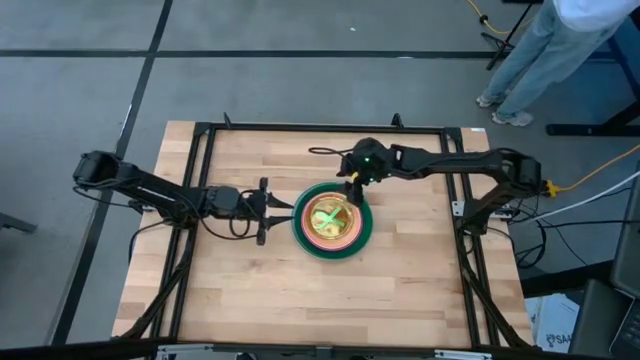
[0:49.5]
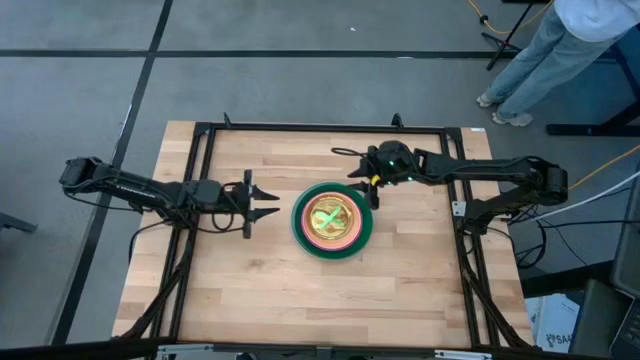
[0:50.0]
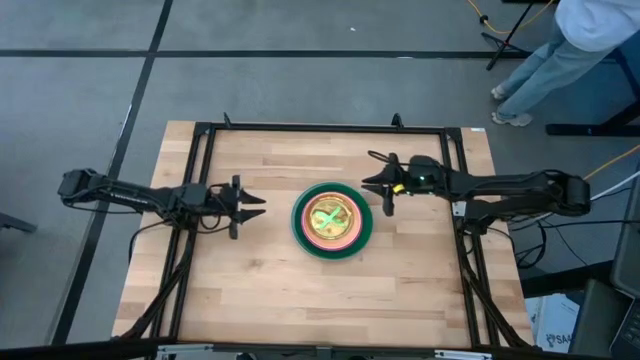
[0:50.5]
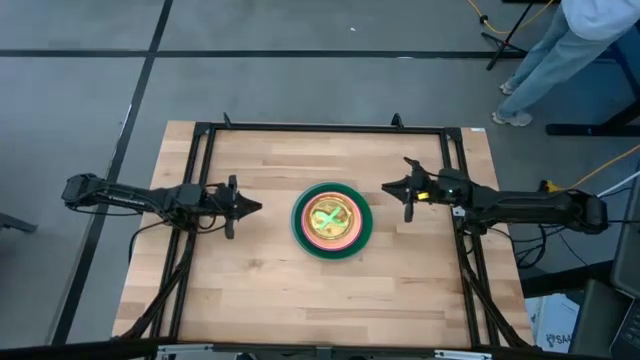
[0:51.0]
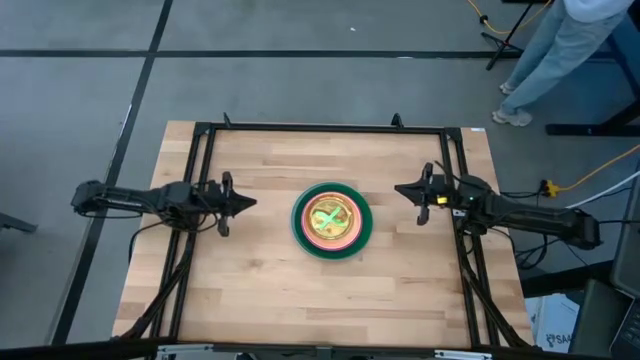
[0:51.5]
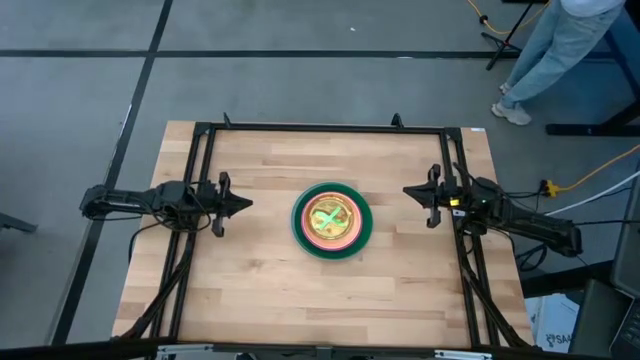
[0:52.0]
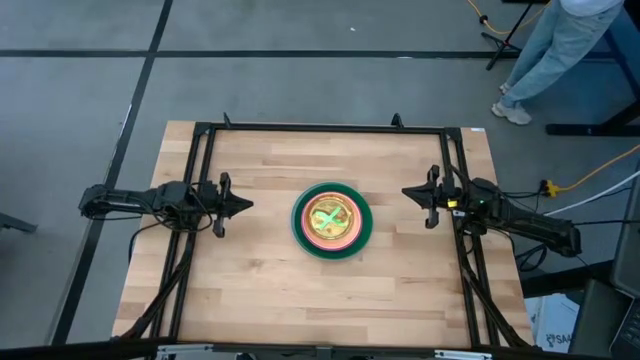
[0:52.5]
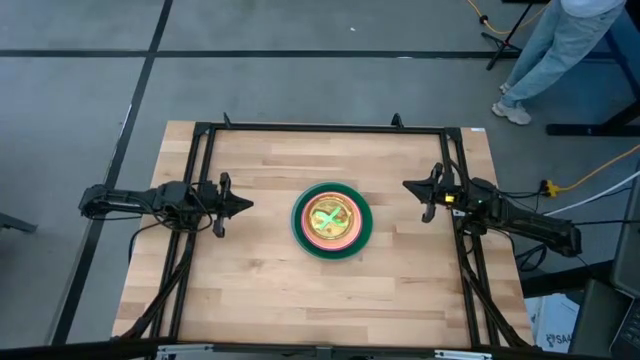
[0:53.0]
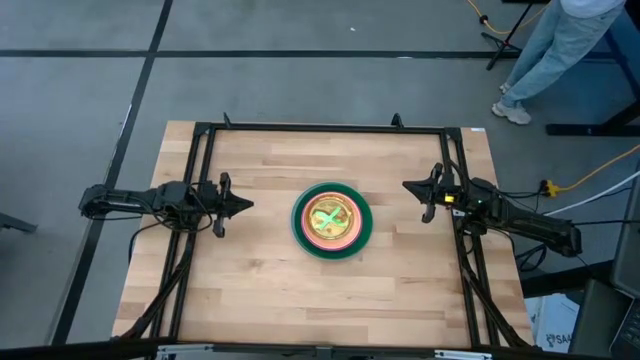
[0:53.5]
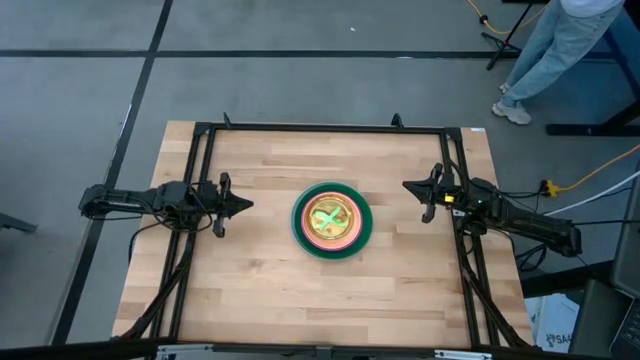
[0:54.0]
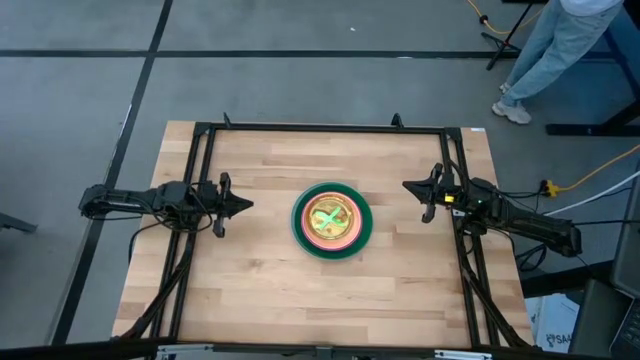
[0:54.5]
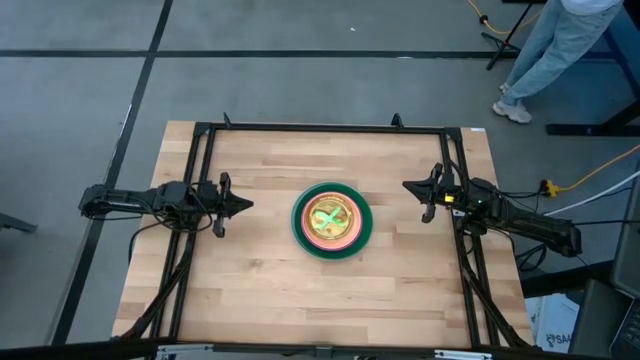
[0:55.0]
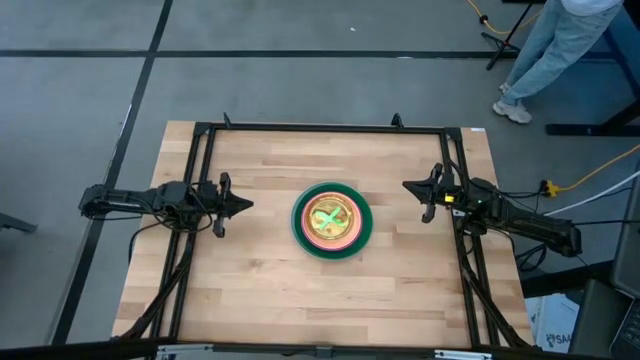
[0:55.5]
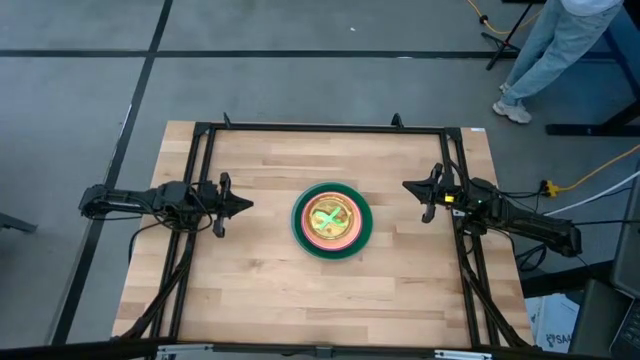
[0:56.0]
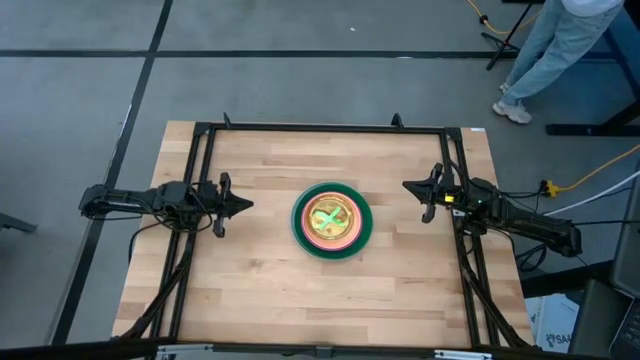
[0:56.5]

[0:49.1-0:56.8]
Task: Stack plastic plates
Return to Home Position

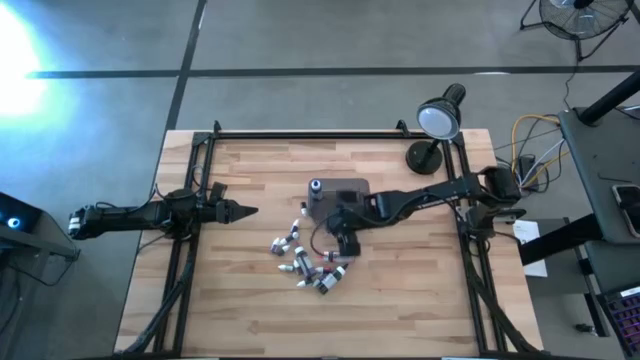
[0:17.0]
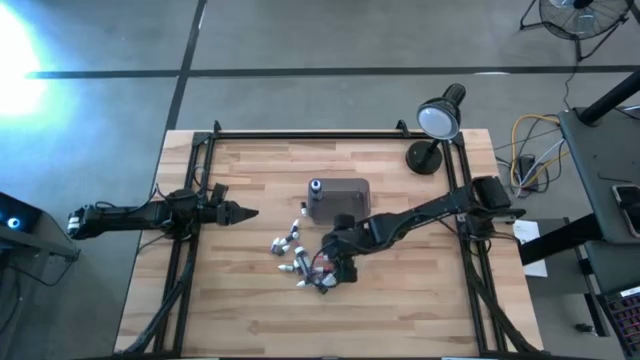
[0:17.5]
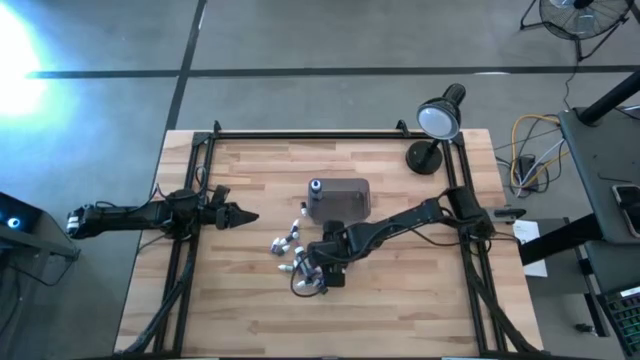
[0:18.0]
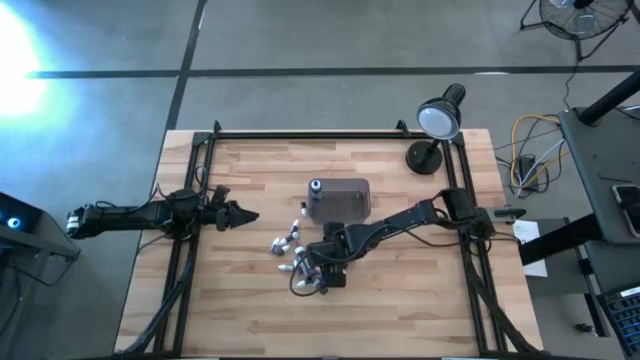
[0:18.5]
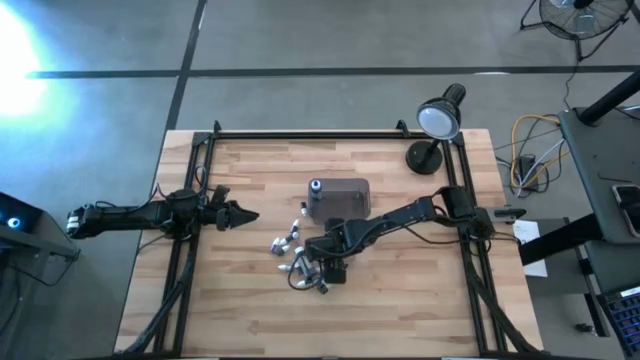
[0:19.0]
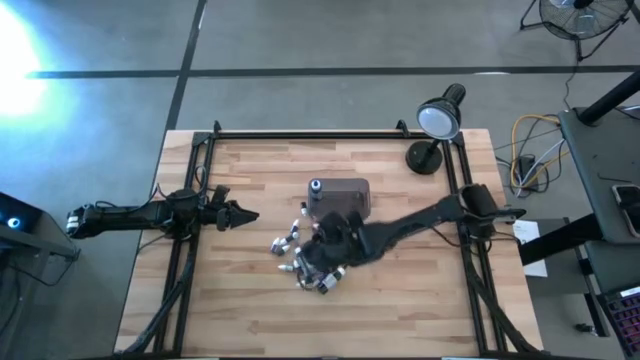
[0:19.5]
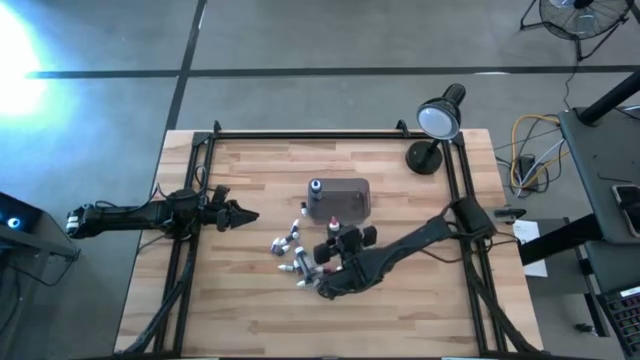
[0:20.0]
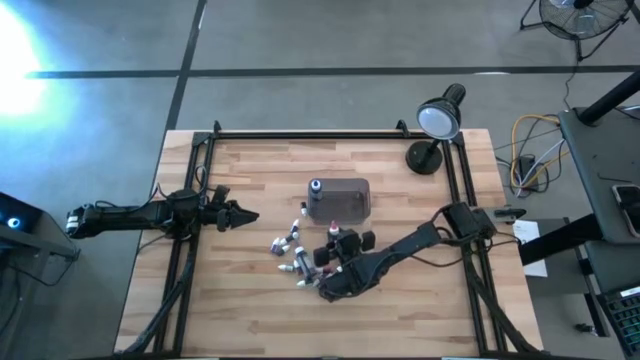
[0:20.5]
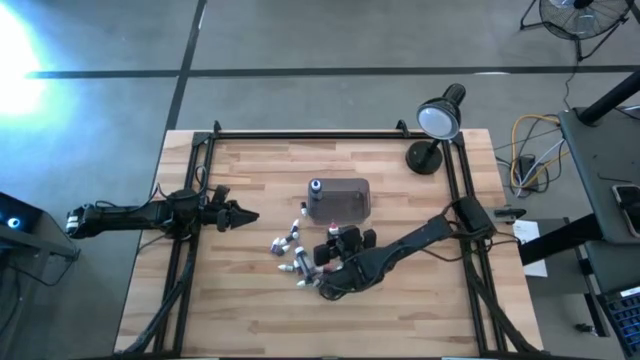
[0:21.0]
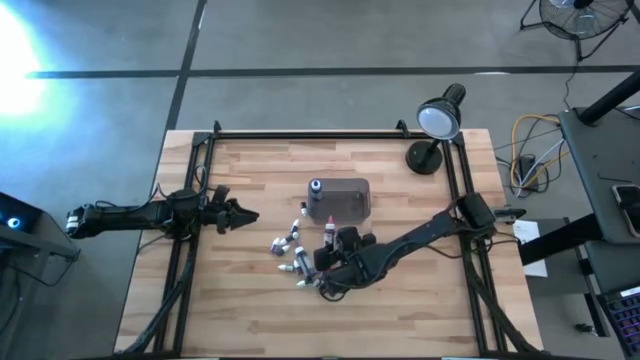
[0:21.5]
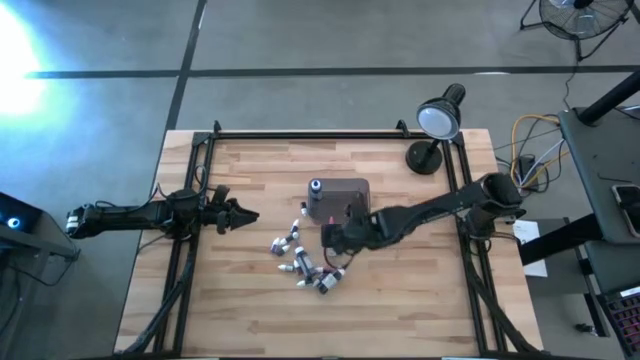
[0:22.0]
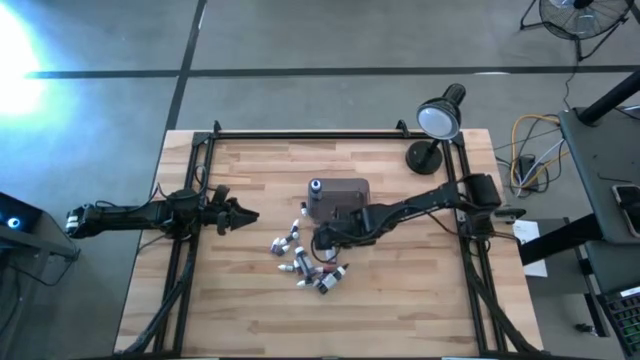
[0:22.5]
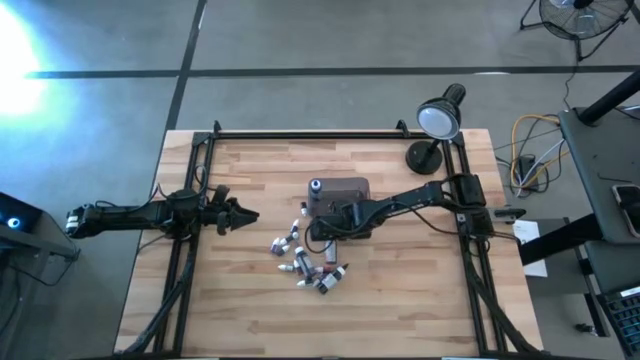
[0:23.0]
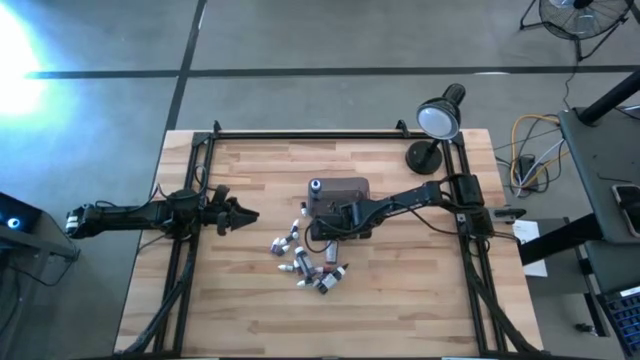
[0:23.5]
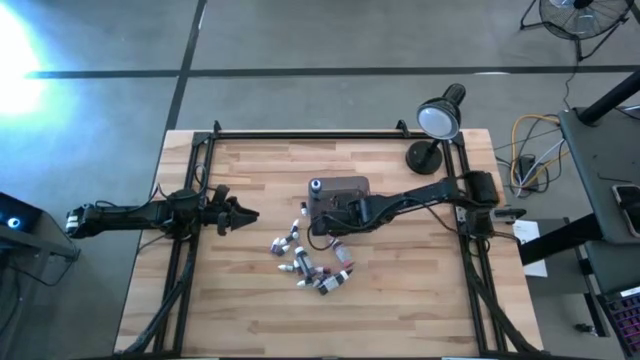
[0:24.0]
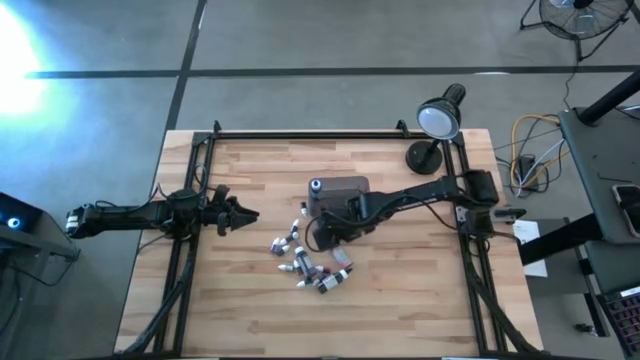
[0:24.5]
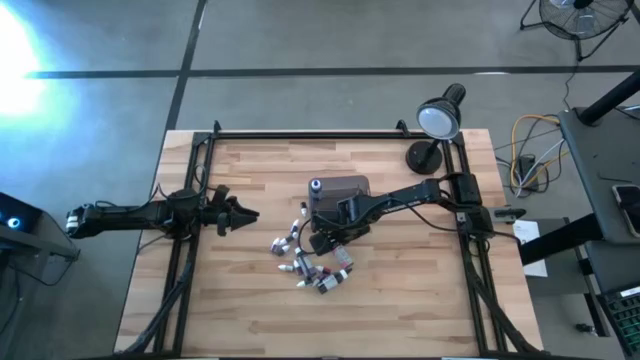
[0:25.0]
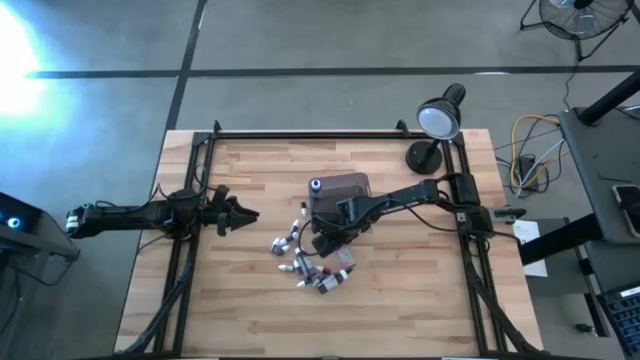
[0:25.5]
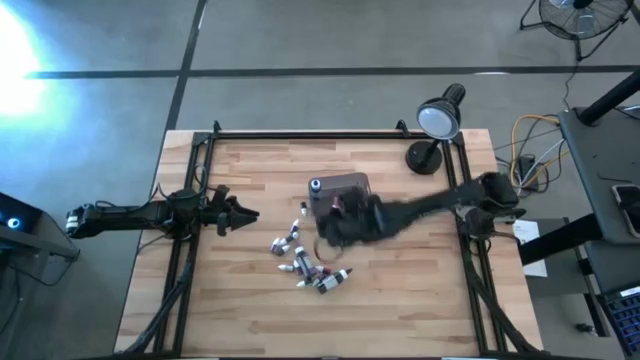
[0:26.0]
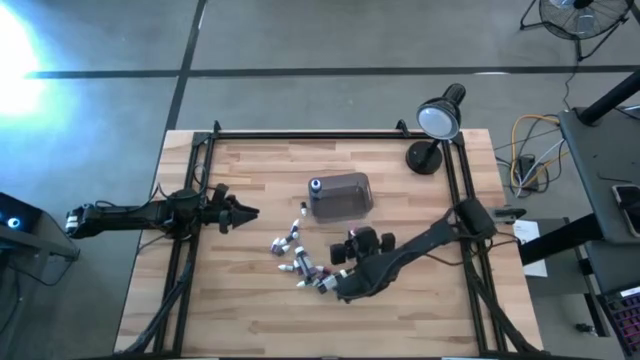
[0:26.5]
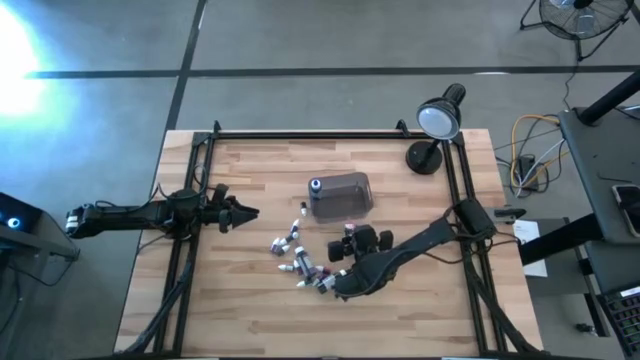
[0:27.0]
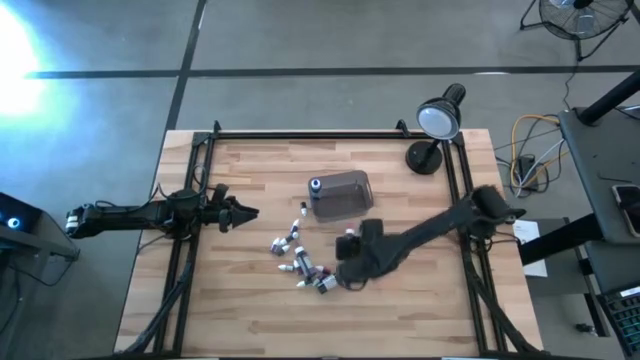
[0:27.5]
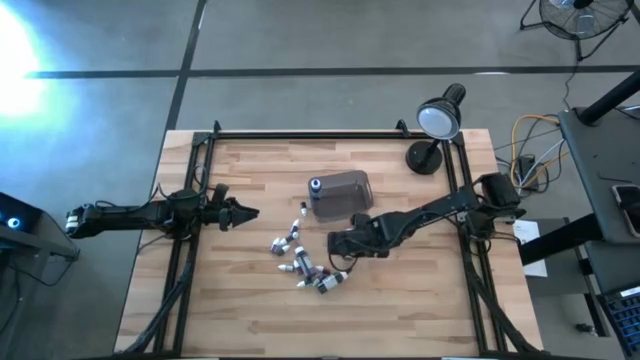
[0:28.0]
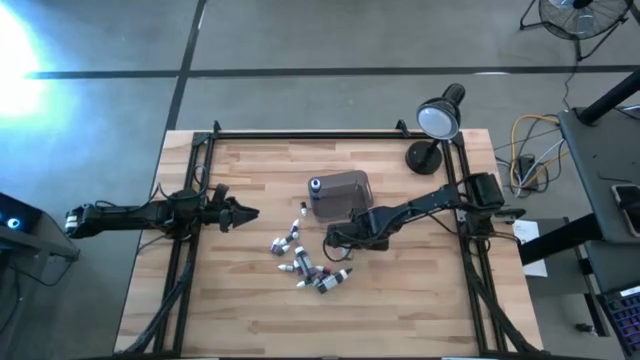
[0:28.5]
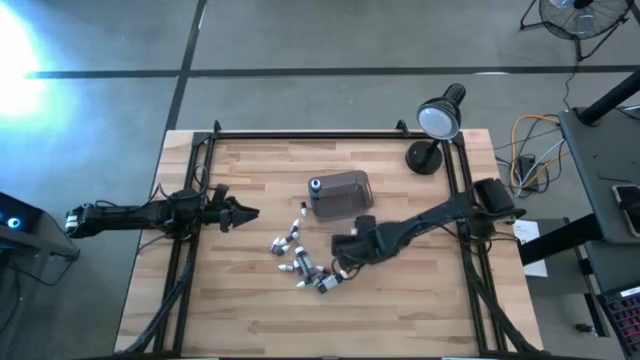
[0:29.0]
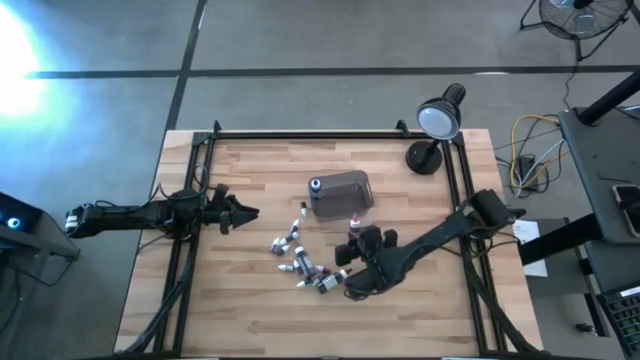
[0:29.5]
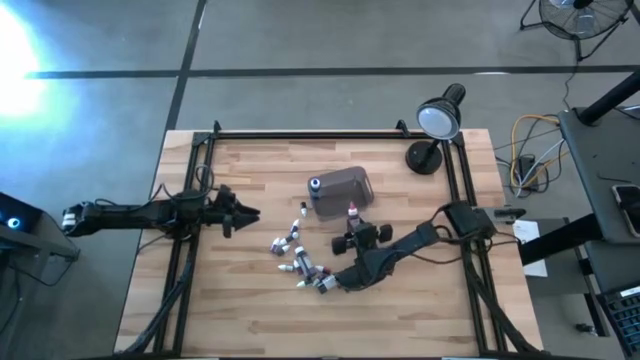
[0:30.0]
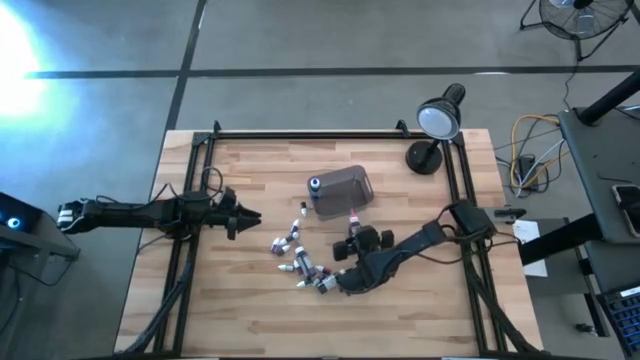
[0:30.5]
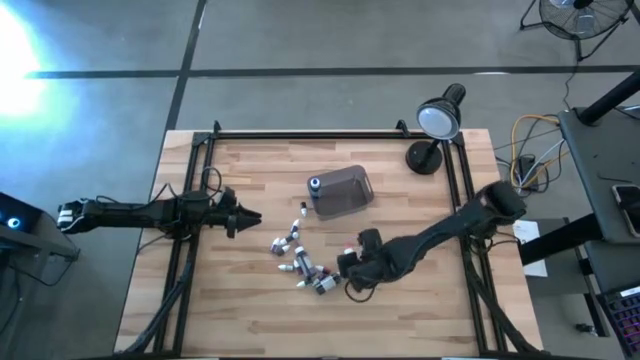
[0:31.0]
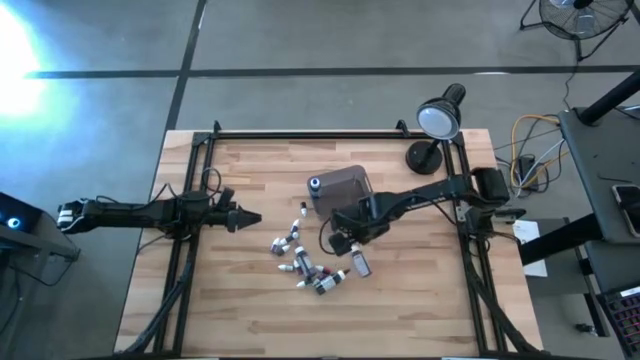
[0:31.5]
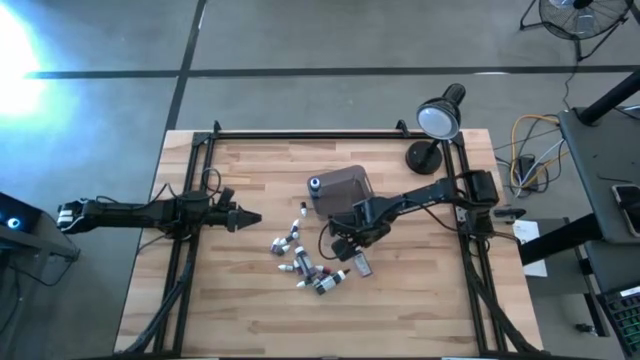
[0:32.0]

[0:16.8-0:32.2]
Task: Pick & Place food coloring
Put the big pink food coloring bottle into the black transparent bin
